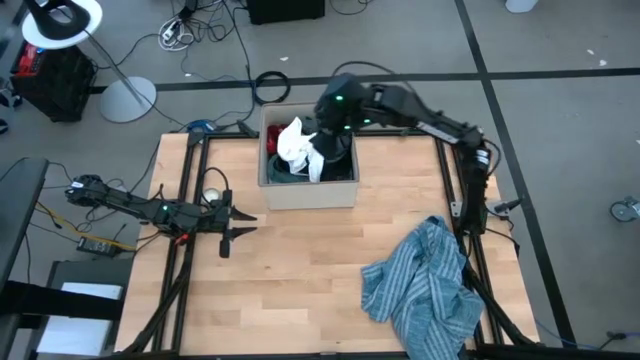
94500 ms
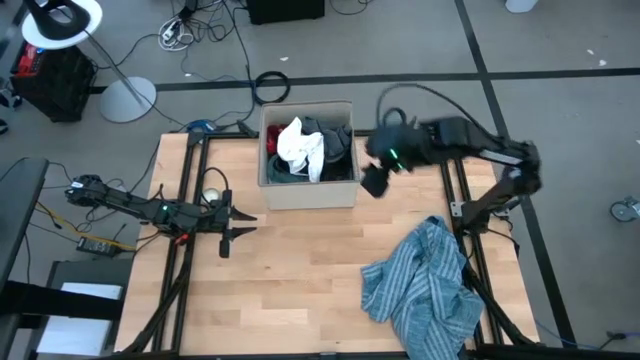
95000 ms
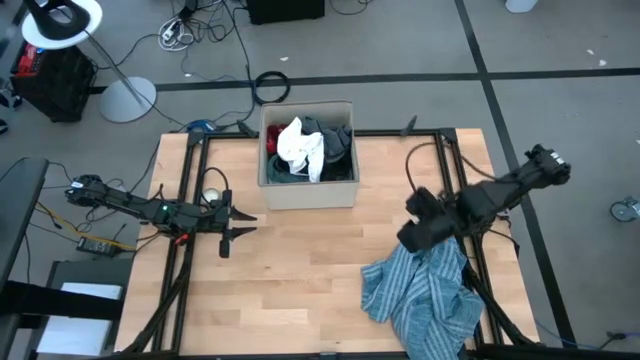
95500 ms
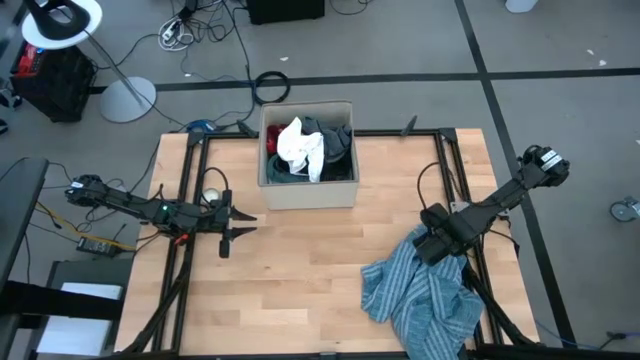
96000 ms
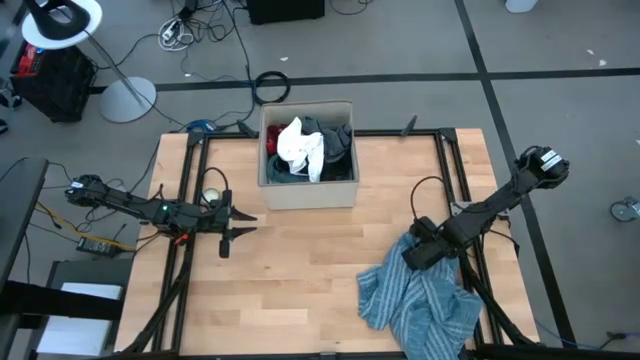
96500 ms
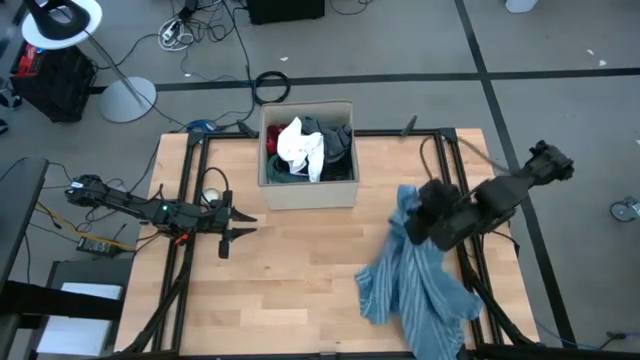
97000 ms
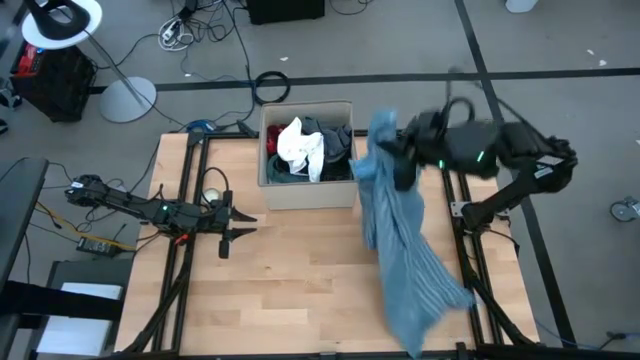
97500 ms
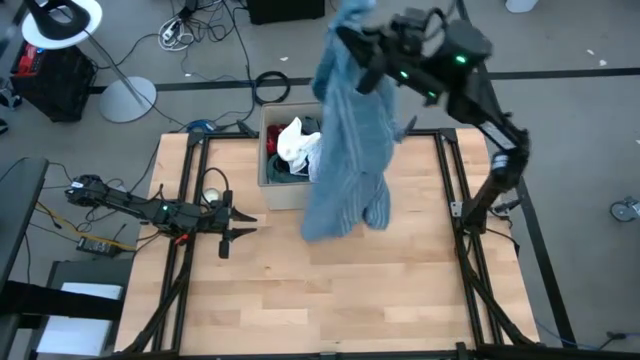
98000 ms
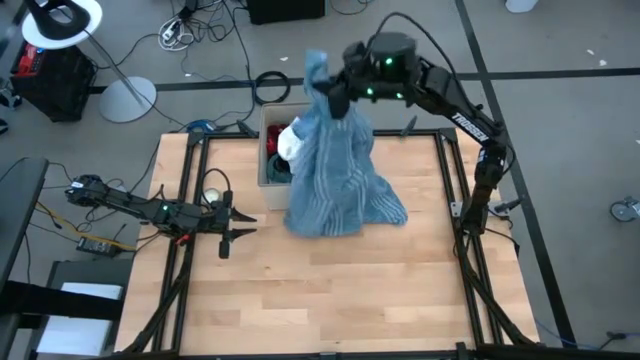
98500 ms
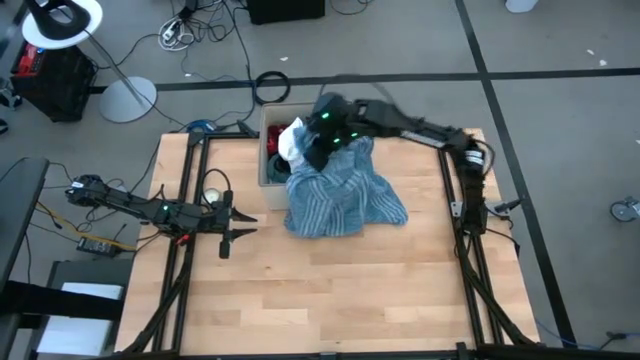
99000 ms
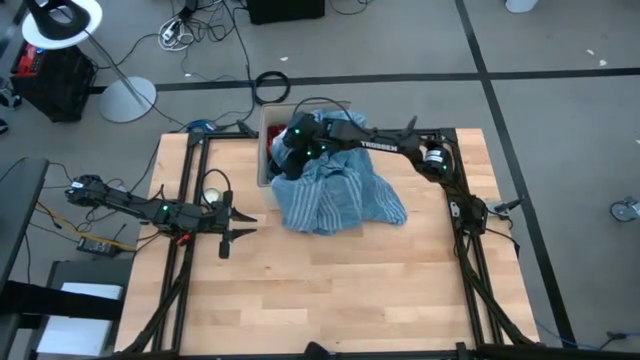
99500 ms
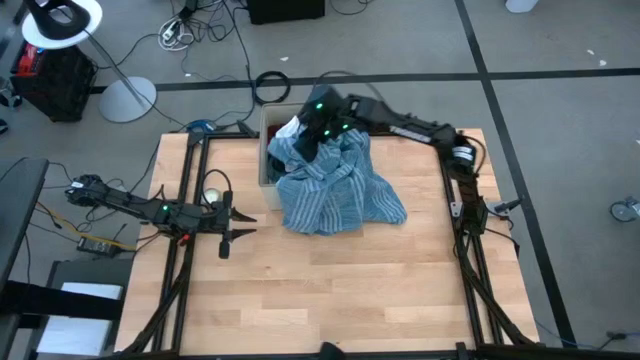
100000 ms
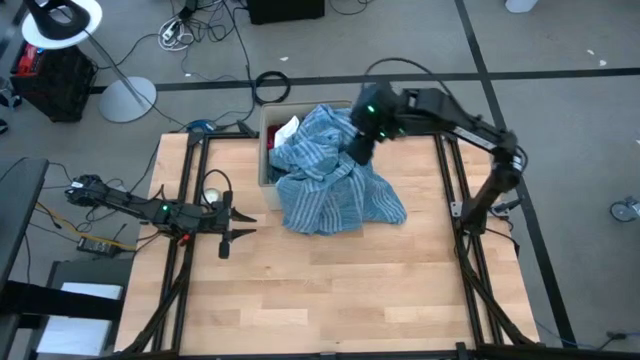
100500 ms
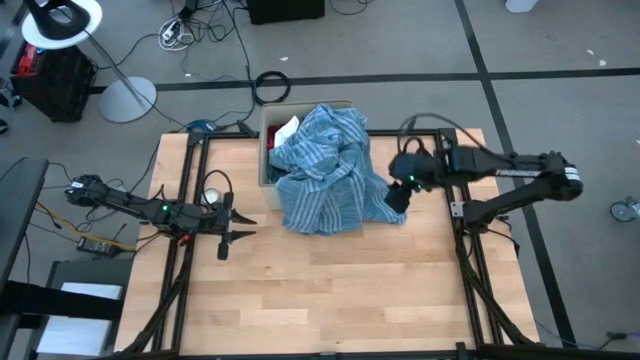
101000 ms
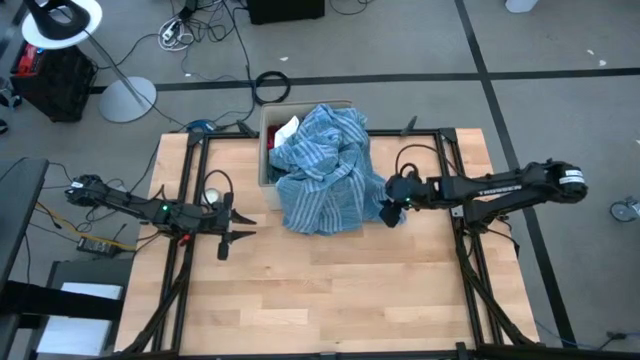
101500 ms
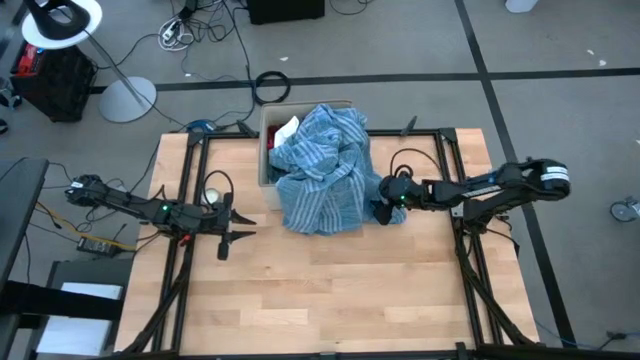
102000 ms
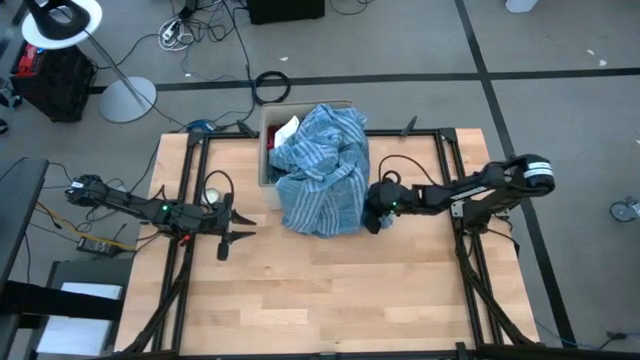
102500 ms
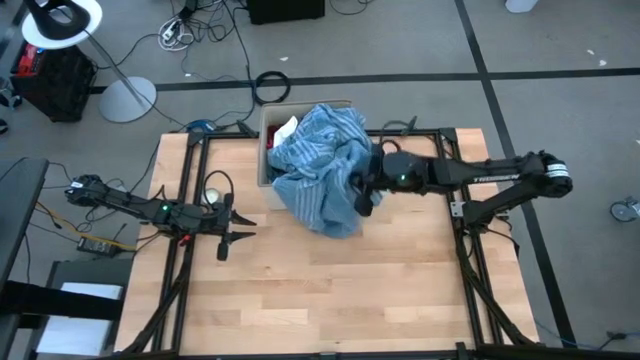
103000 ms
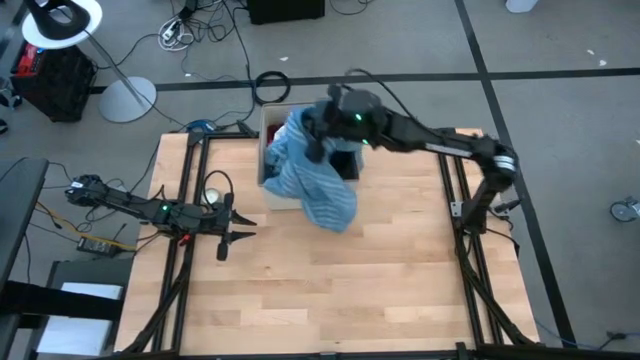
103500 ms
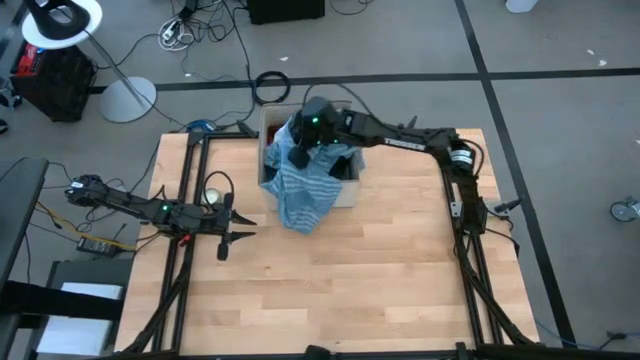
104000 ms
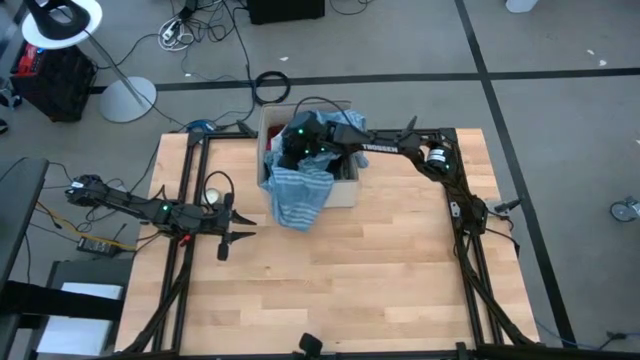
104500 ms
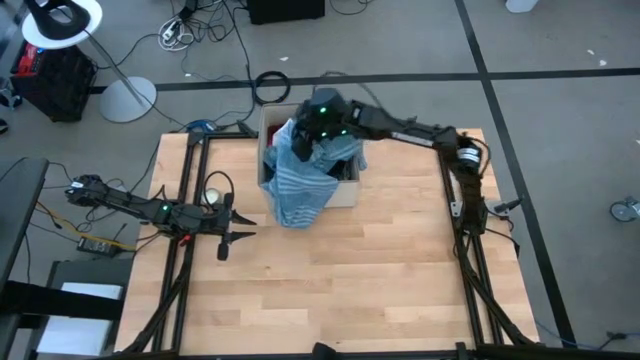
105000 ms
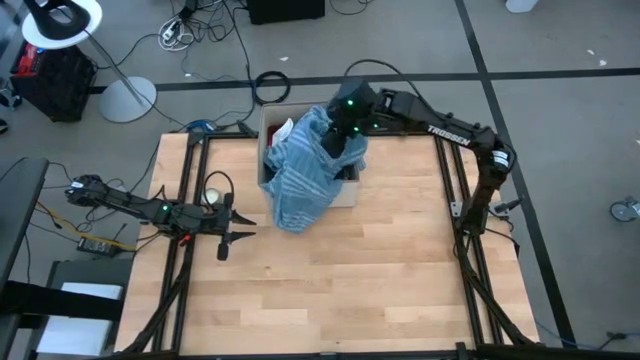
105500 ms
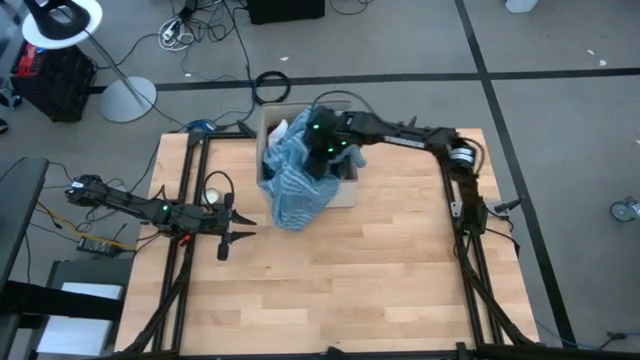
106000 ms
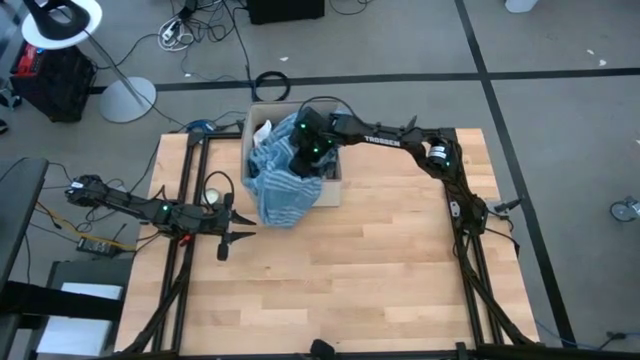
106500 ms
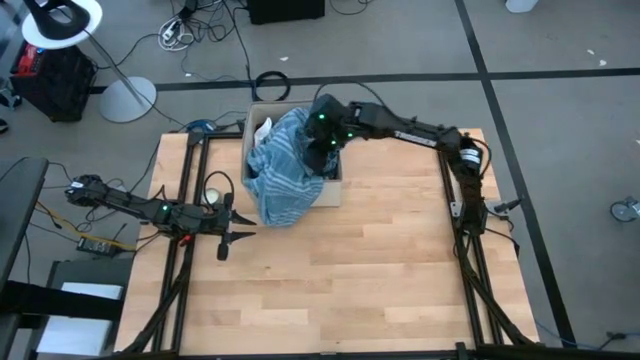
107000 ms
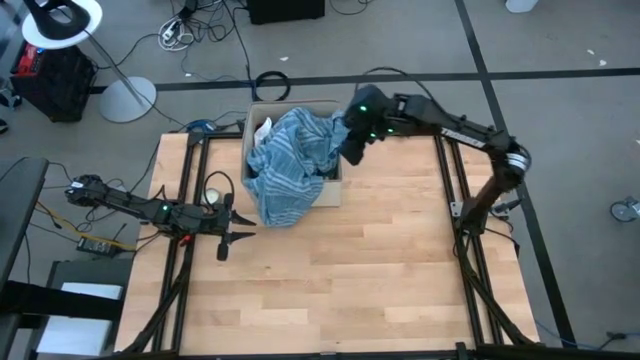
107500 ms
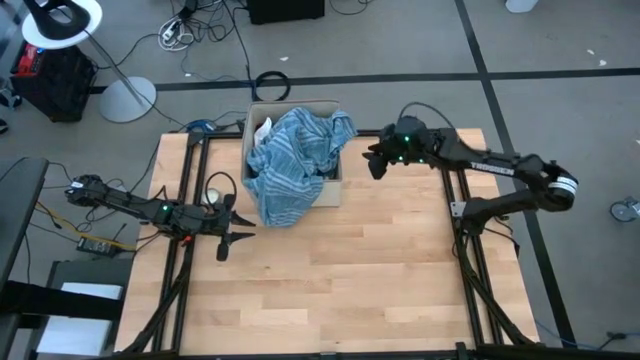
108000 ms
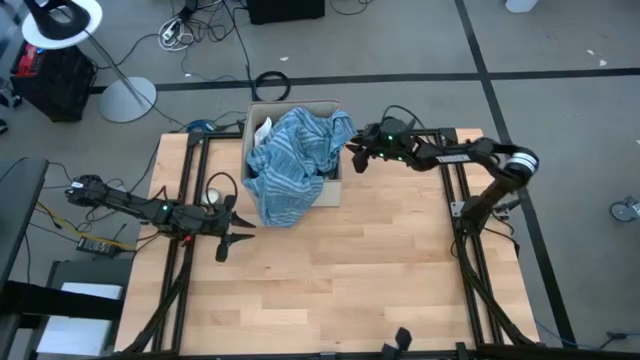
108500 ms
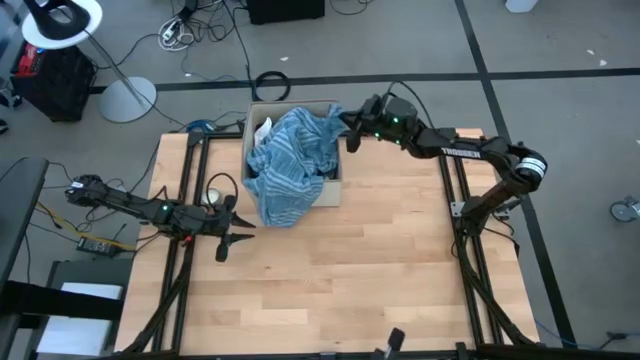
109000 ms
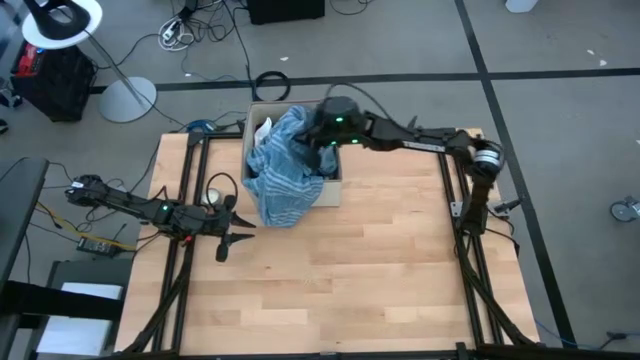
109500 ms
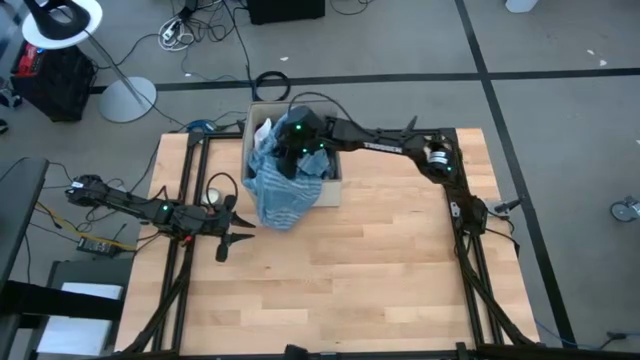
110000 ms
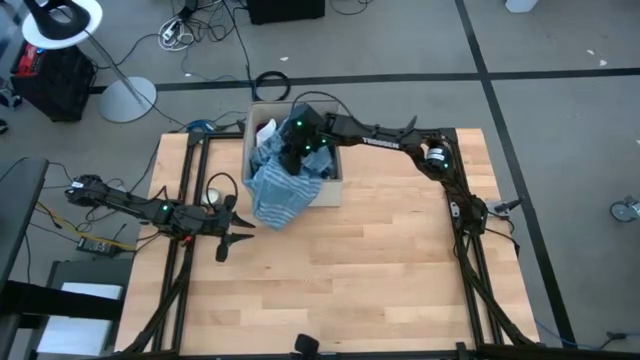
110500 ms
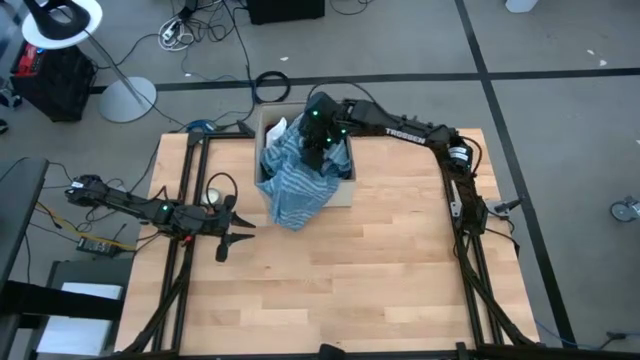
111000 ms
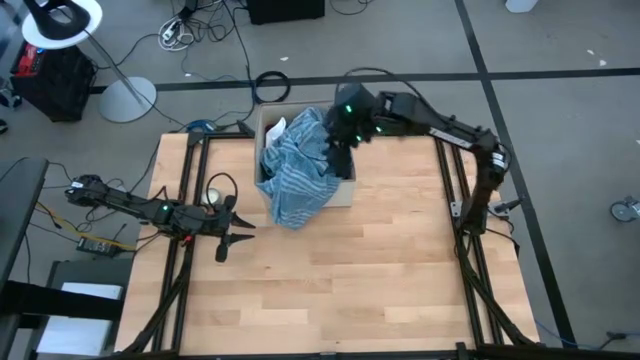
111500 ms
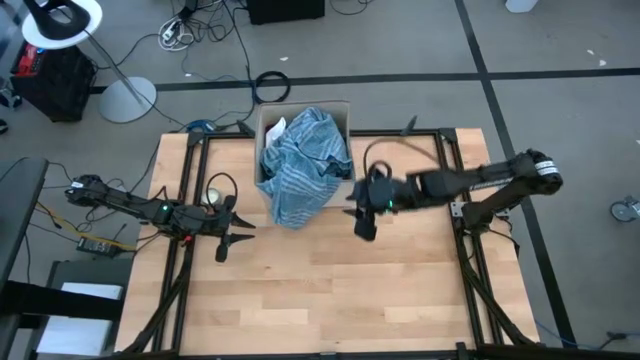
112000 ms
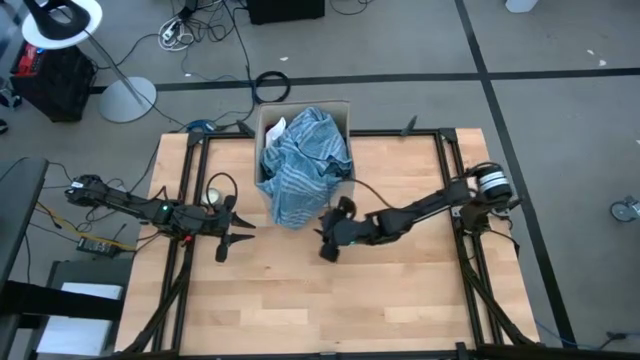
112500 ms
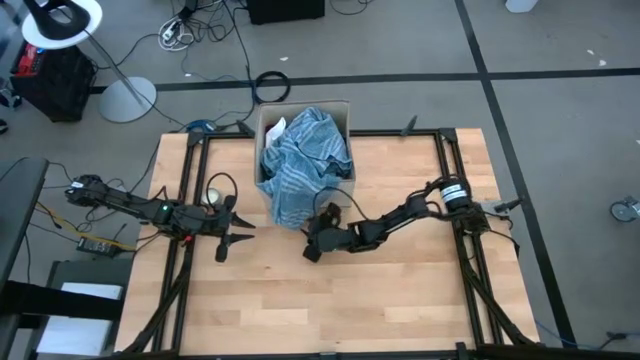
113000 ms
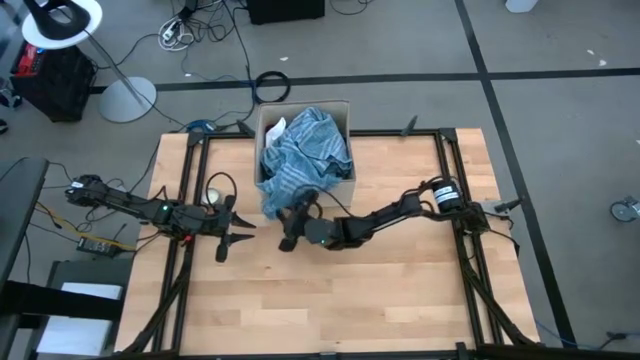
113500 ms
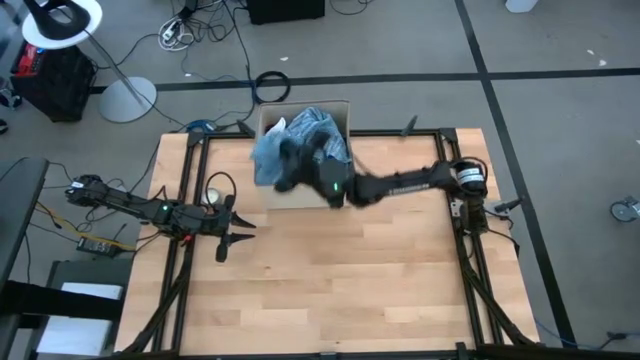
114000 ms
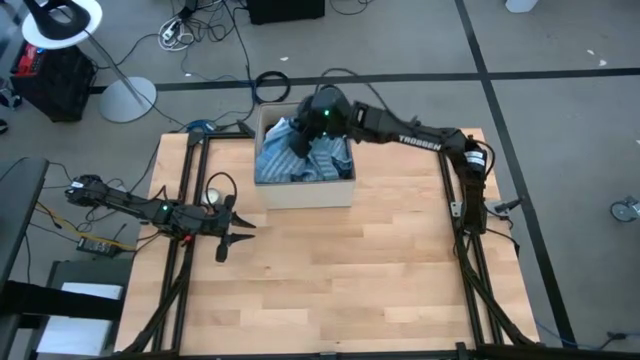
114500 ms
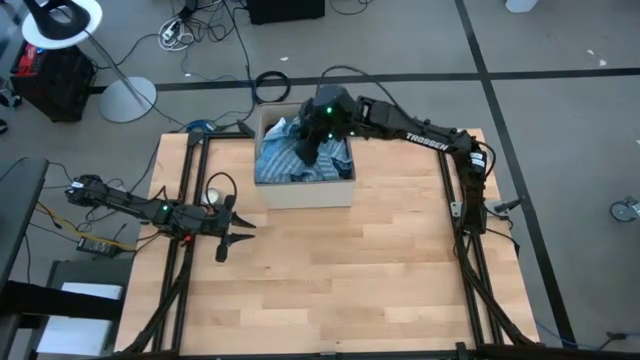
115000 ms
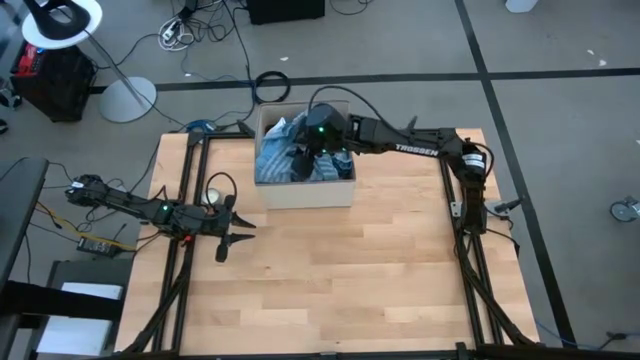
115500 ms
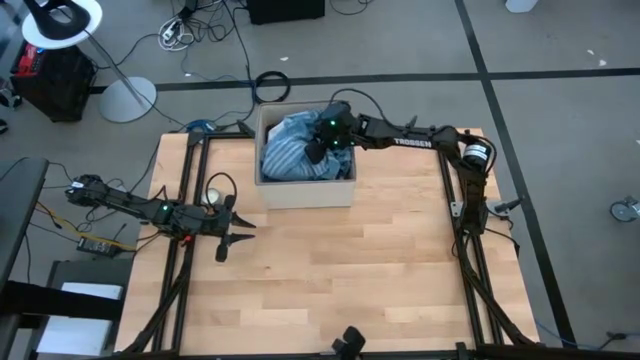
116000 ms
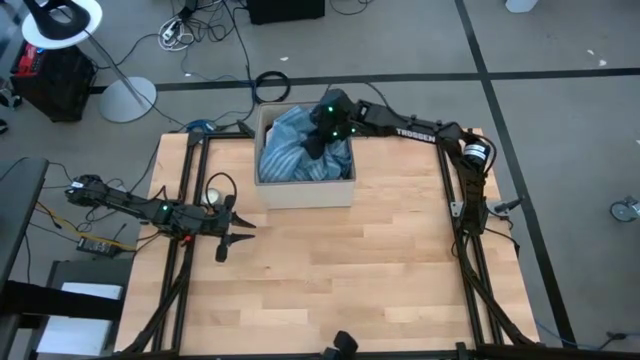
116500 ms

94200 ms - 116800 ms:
Task: Sort clothes
Put the blue striped shirt into the laundry organizer
